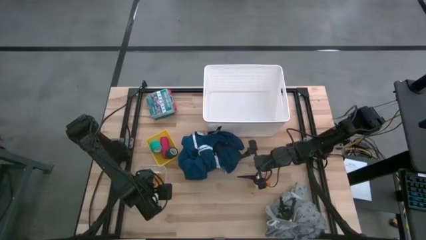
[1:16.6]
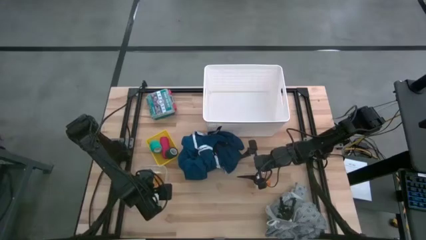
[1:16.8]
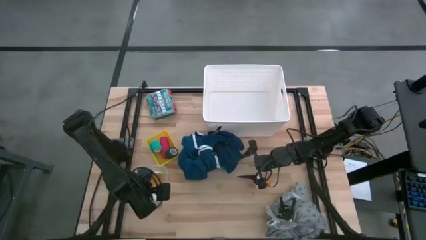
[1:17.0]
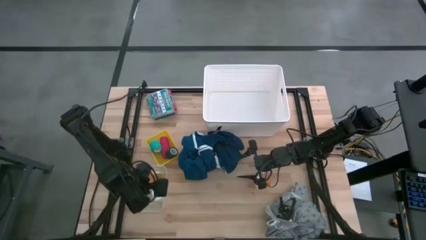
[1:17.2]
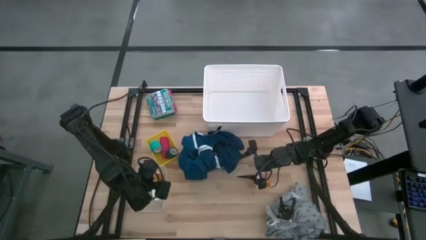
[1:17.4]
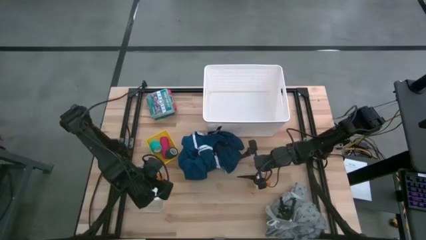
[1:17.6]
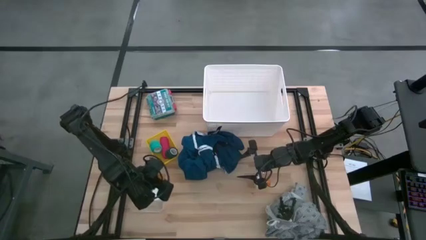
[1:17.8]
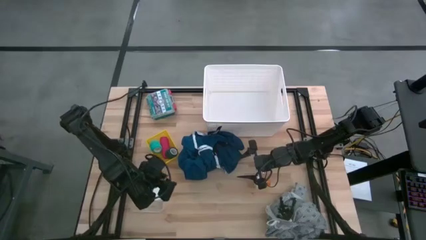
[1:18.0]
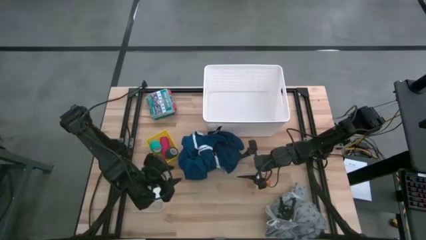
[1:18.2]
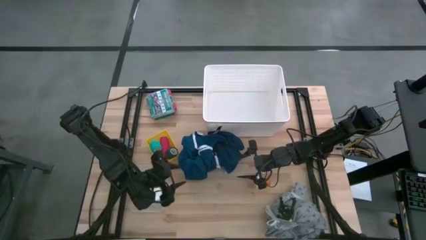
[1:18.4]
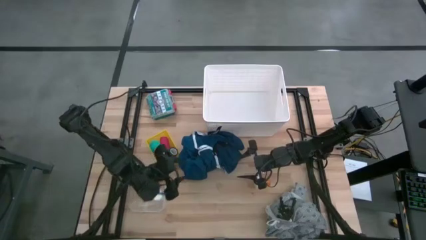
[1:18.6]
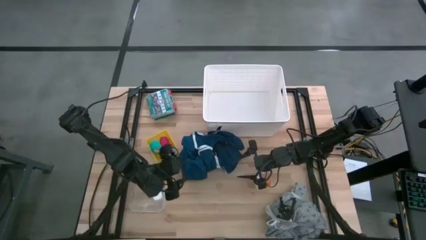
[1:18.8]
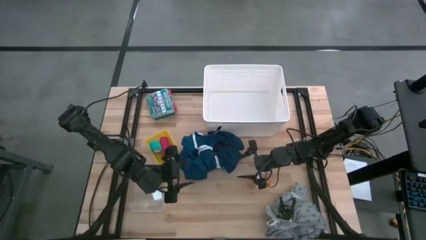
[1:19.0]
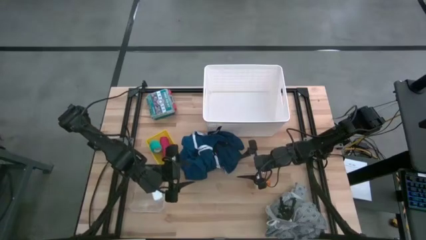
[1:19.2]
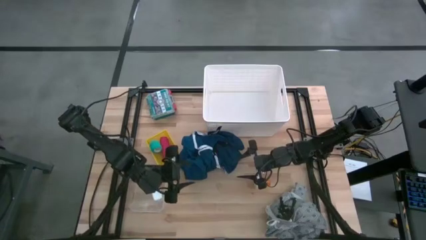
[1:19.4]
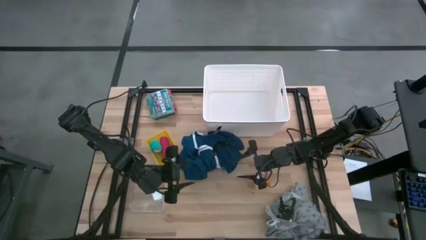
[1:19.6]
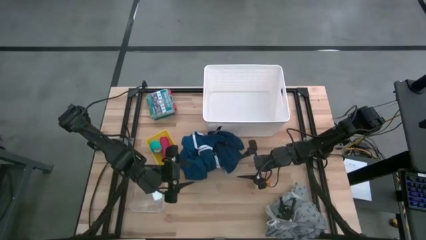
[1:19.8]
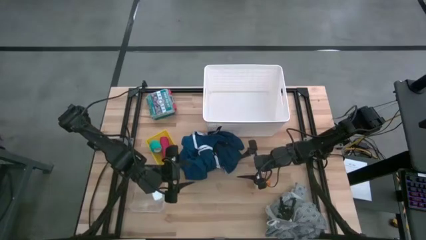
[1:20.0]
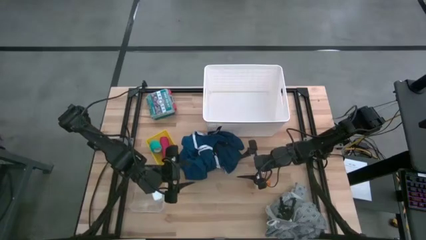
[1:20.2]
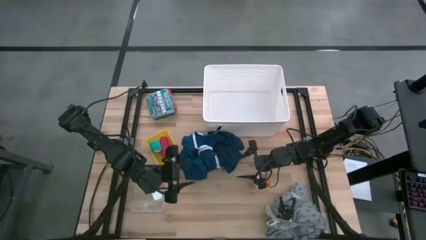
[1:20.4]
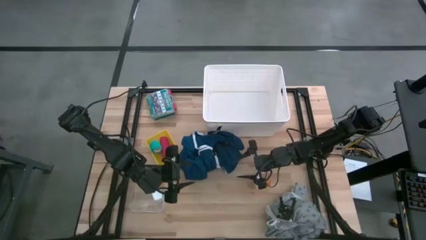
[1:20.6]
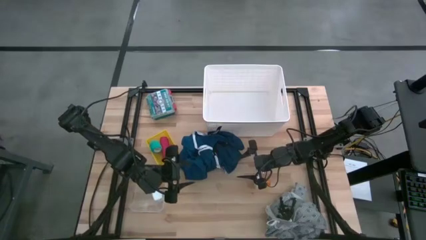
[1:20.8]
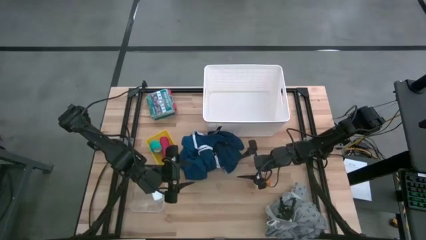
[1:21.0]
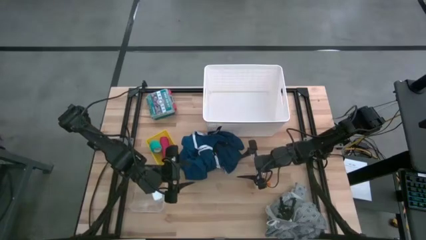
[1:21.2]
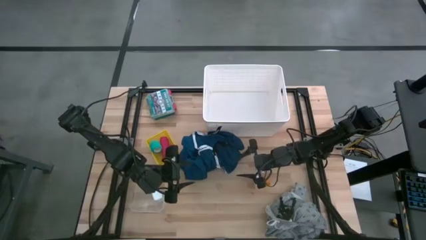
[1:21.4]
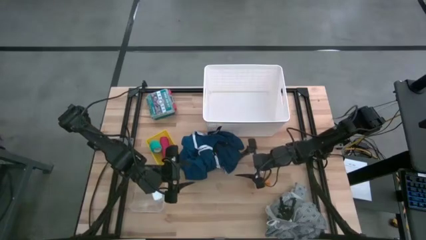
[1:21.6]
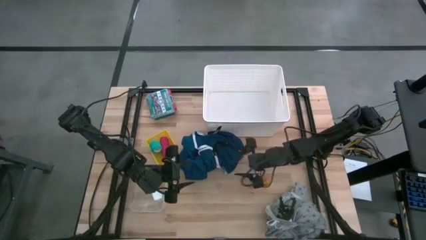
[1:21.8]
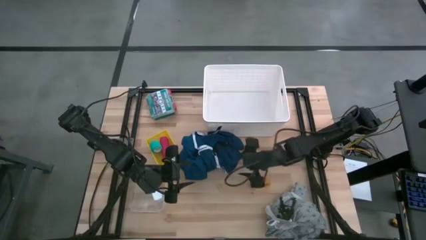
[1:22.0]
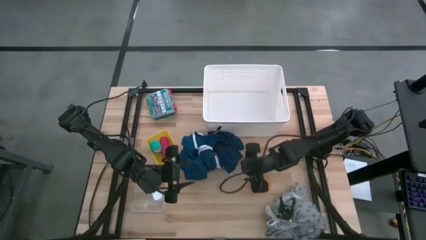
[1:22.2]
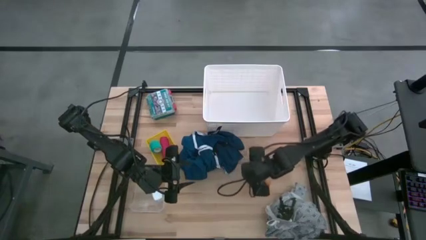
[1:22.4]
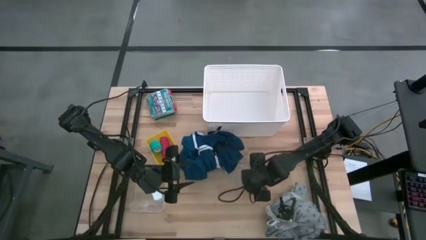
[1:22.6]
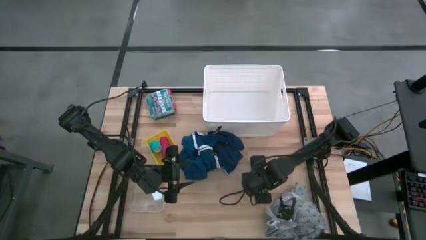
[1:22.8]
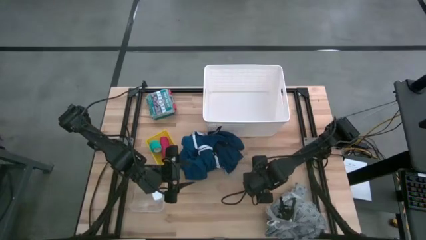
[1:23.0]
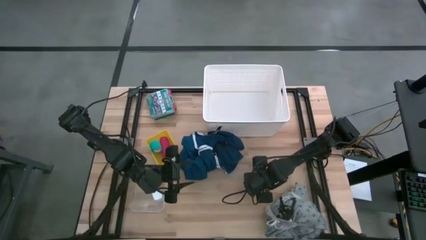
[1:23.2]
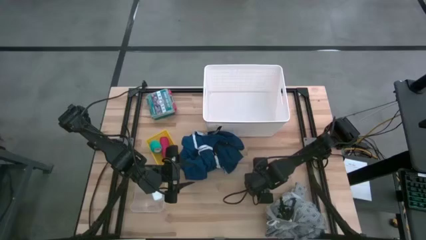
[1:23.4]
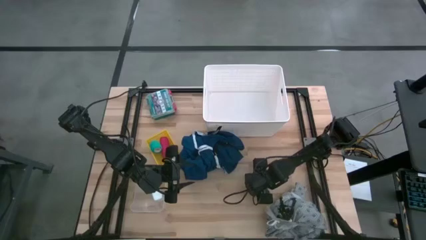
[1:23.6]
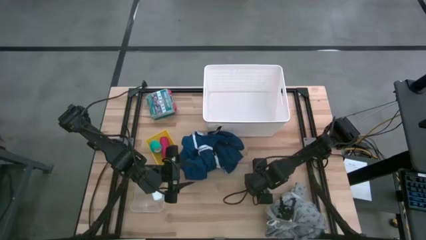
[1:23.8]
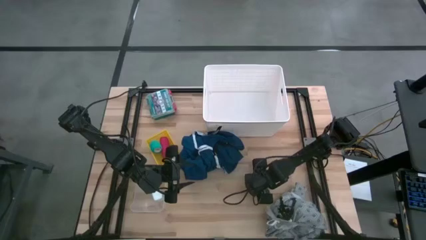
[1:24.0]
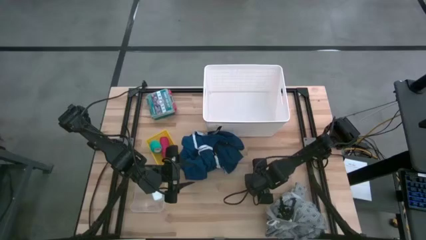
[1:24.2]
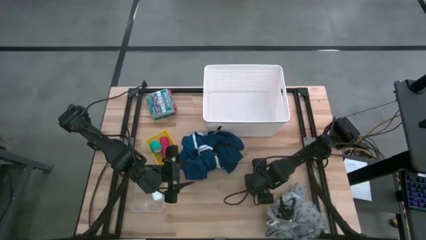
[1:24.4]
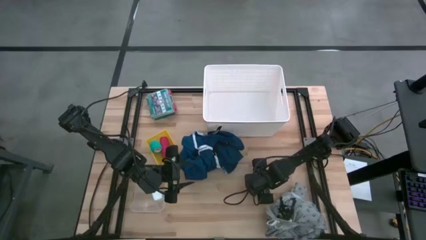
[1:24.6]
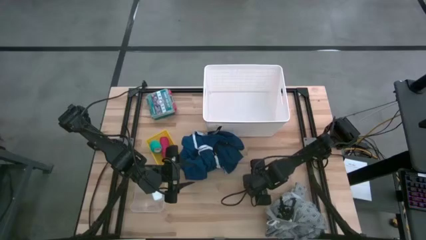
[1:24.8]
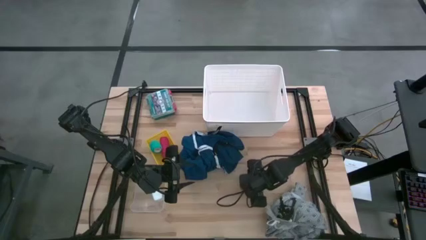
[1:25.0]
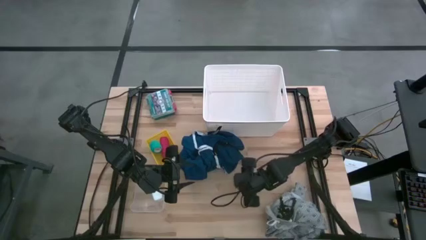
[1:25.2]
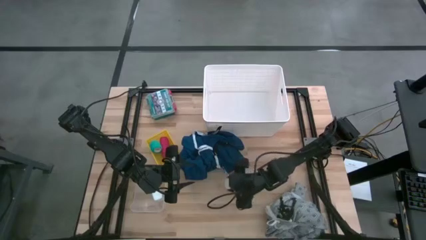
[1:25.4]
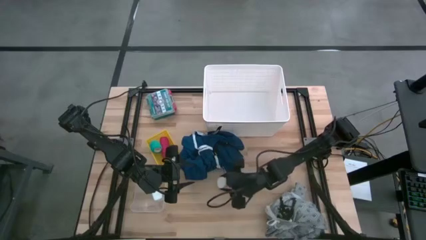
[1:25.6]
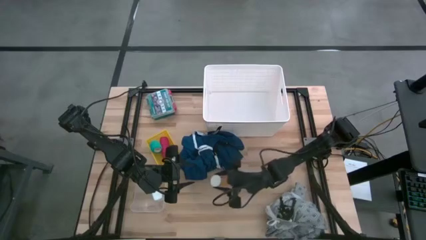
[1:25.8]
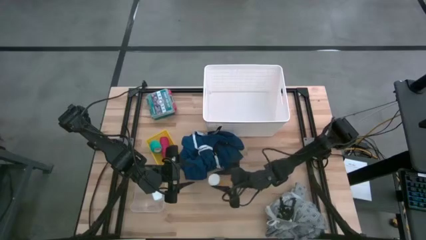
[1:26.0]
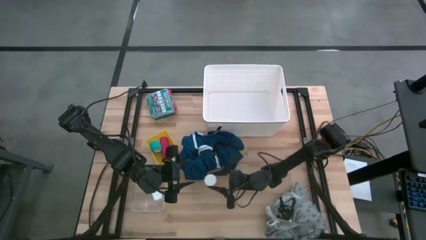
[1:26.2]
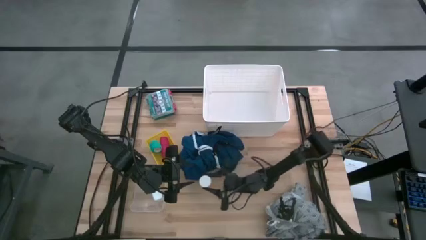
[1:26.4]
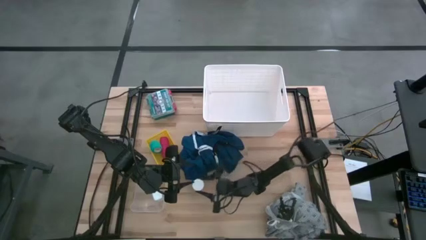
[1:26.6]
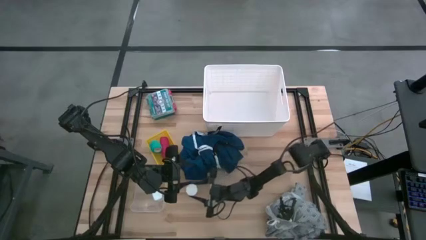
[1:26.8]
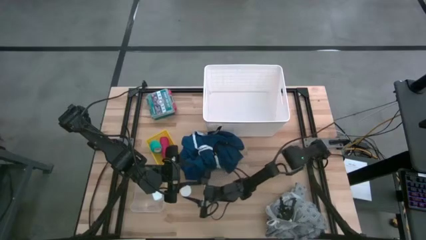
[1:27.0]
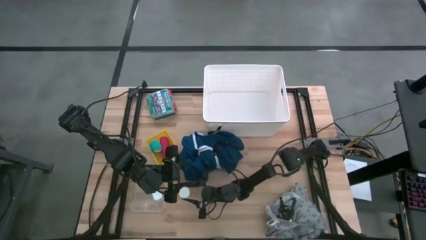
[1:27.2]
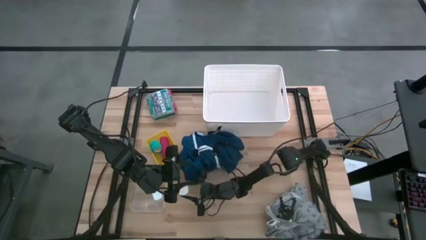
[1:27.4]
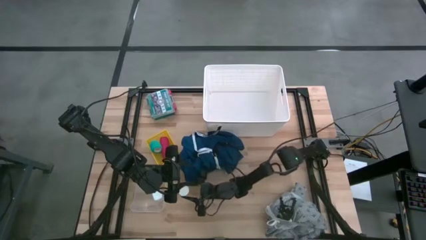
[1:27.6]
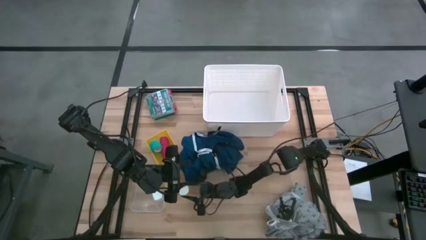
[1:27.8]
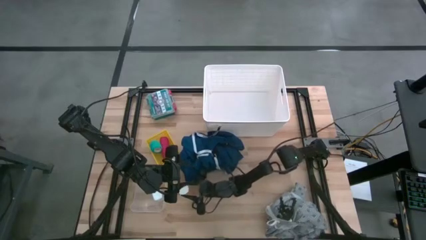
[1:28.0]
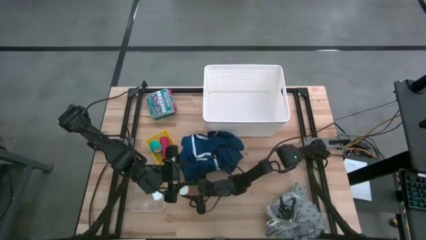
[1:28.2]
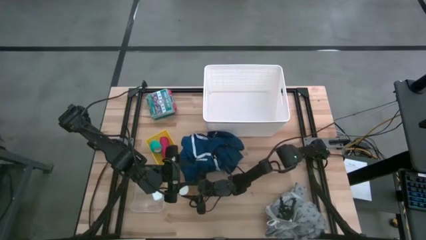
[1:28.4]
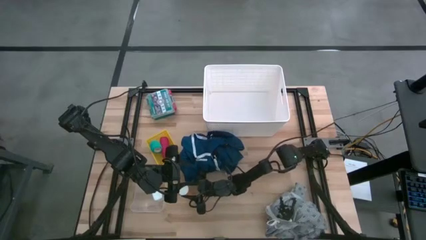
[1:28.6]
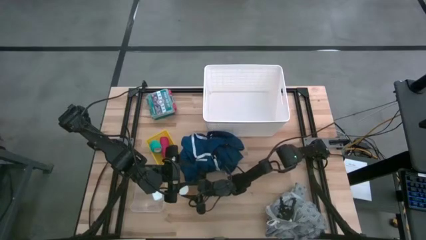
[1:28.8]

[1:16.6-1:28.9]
Task: Pick & place medical supplies in basket/bin
Put the orange pill bottle into the transparent bin
